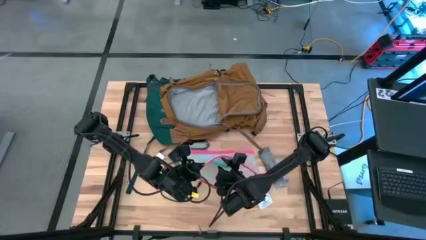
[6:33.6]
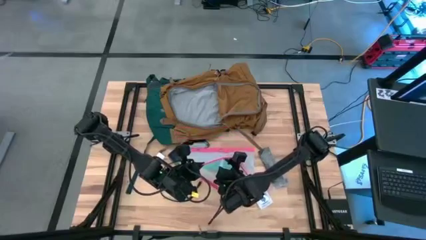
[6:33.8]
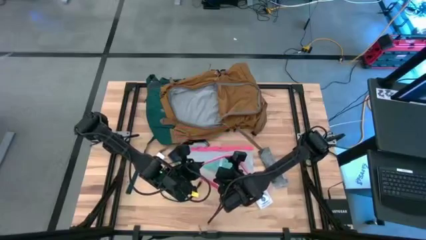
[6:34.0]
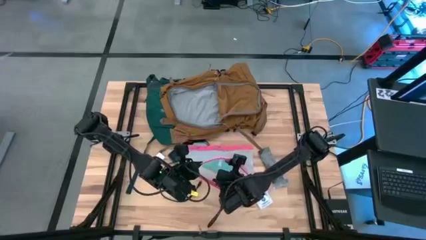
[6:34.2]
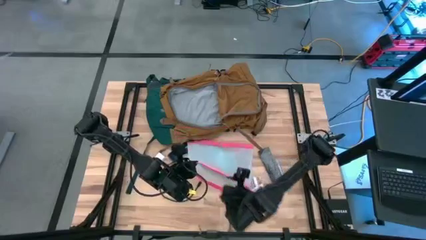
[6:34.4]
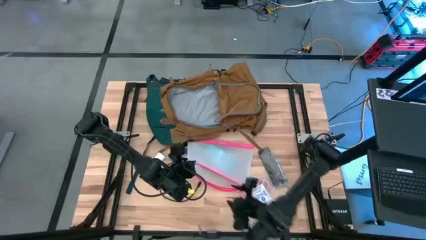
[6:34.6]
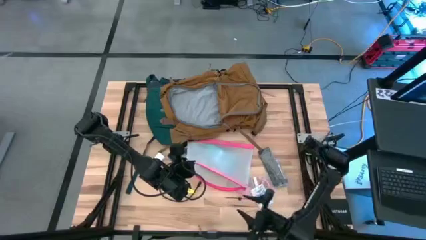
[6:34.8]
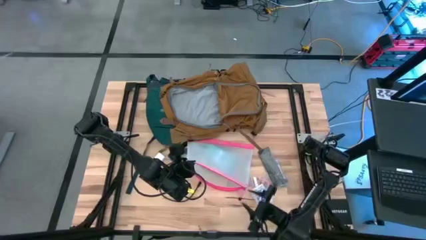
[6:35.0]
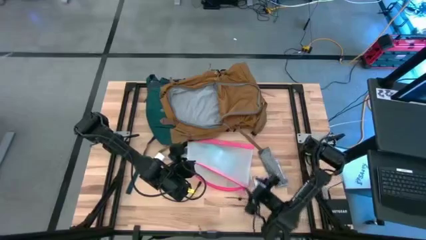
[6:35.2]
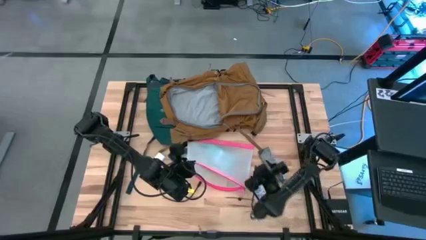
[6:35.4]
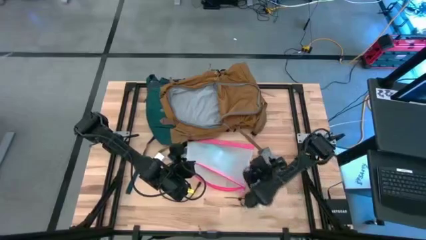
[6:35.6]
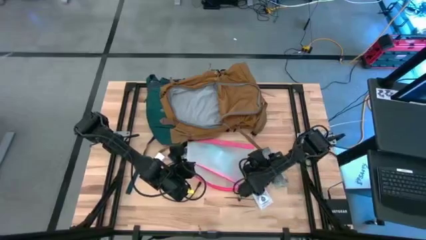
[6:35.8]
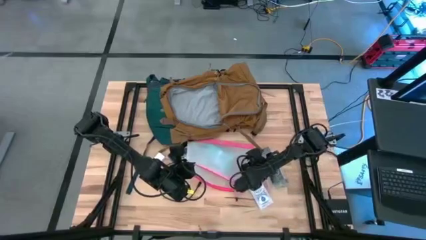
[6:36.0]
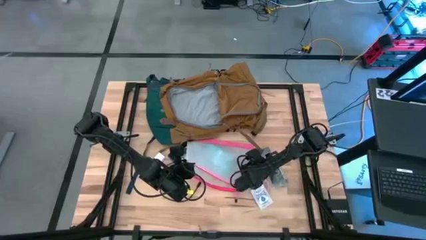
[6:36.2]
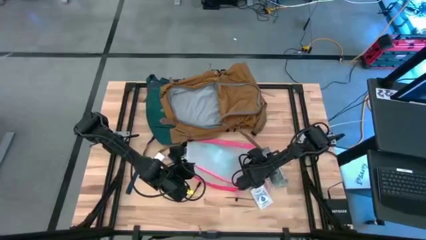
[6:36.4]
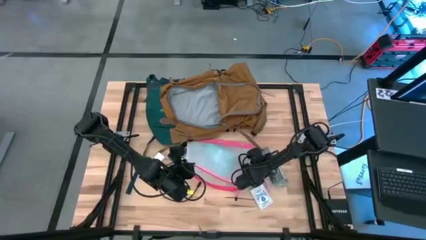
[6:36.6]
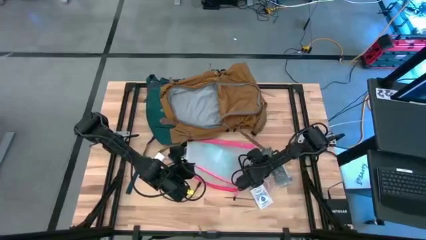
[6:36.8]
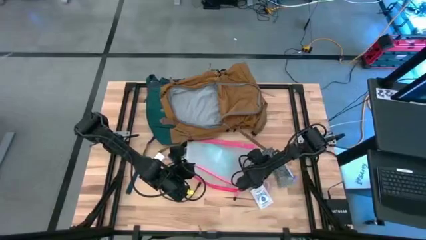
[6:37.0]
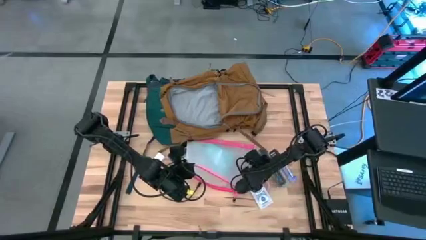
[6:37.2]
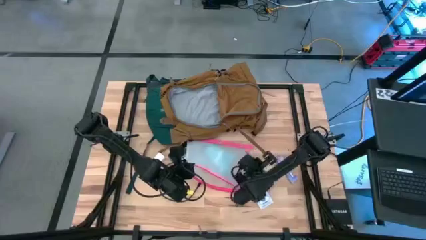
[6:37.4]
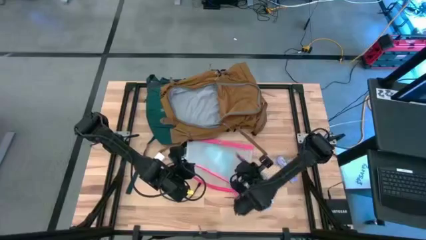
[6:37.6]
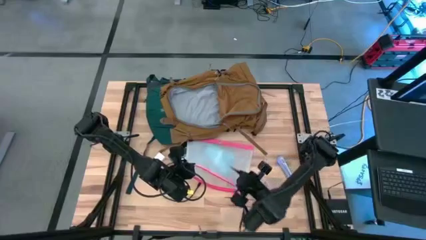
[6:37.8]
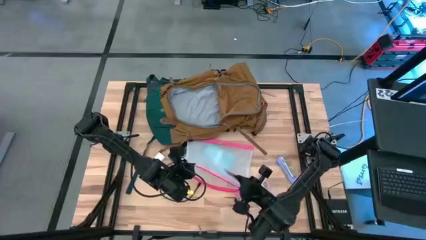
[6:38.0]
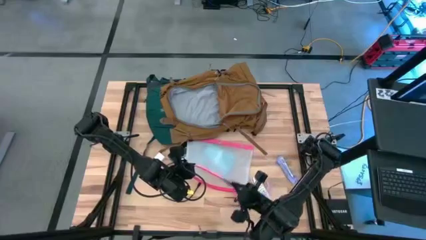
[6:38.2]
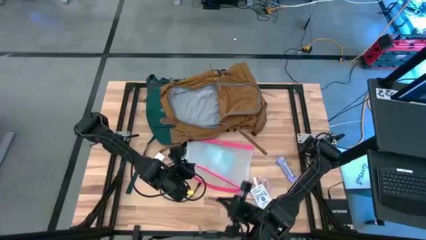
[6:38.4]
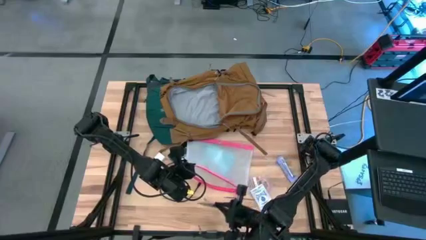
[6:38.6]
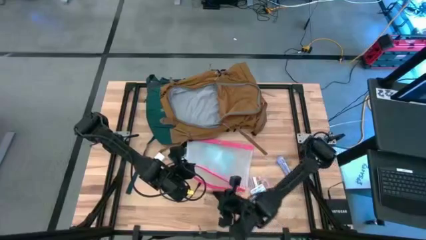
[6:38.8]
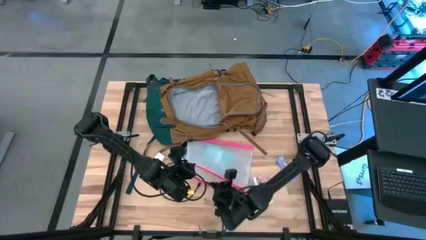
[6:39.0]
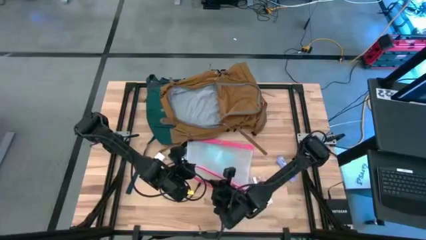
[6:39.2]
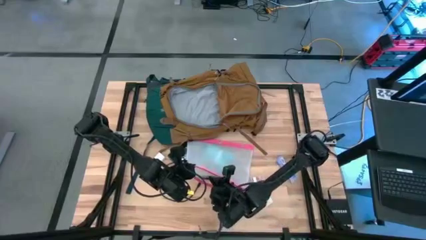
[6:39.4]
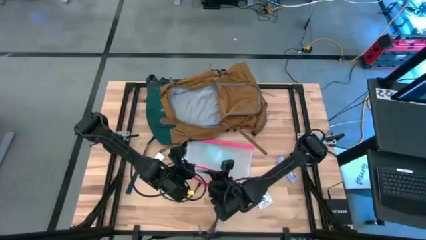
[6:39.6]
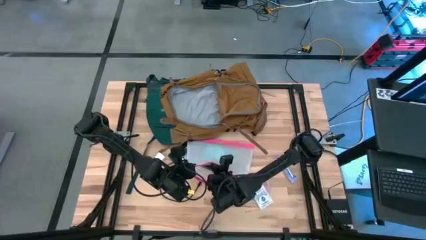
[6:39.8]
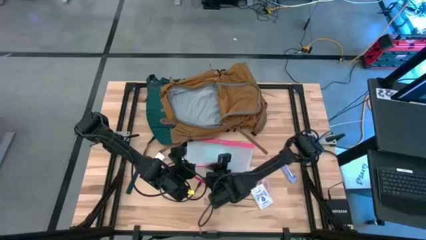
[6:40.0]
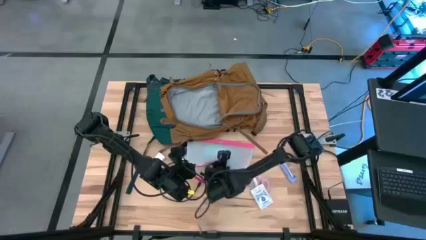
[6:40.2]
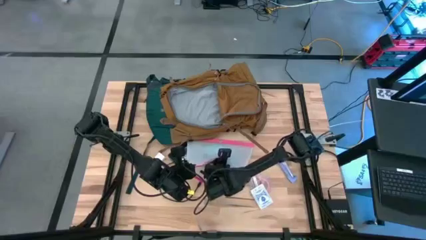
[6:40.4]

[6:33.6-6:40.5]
Task: Unpack backpack
Put the black pouch into the pink zipper pouch

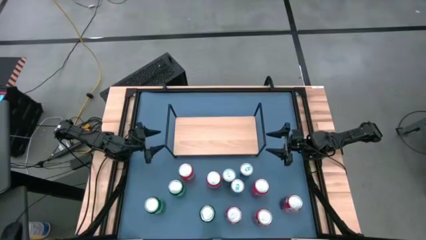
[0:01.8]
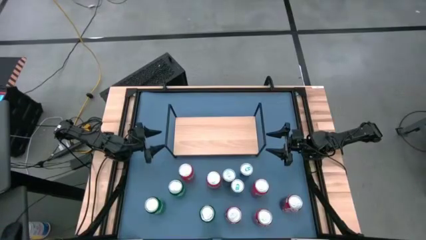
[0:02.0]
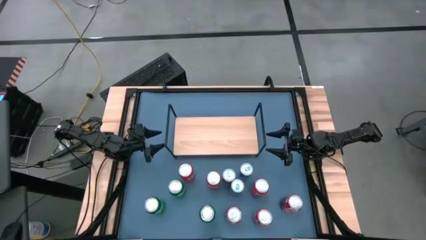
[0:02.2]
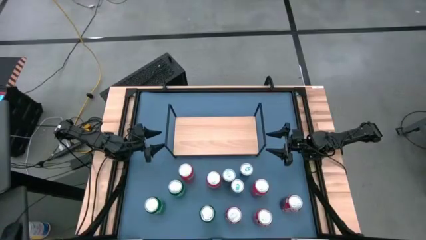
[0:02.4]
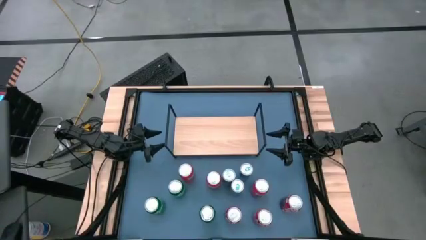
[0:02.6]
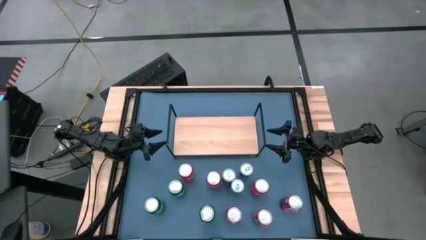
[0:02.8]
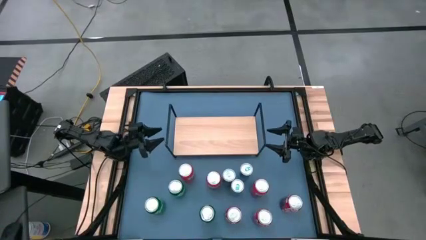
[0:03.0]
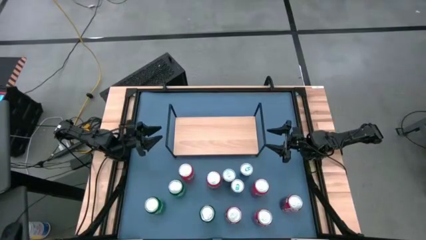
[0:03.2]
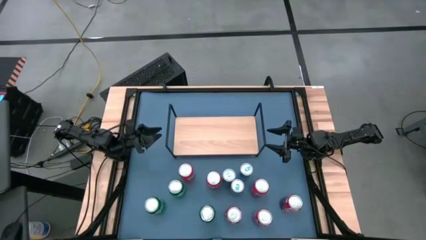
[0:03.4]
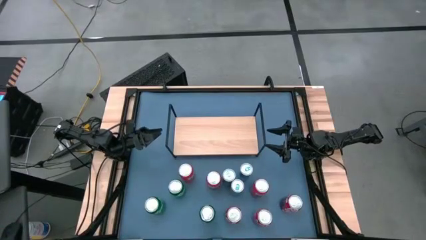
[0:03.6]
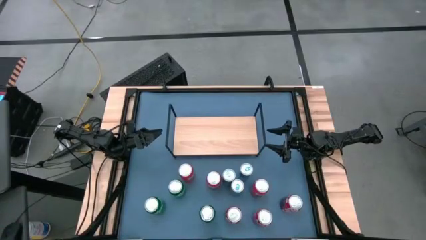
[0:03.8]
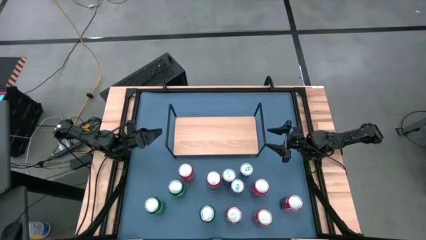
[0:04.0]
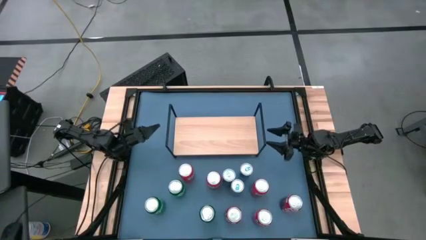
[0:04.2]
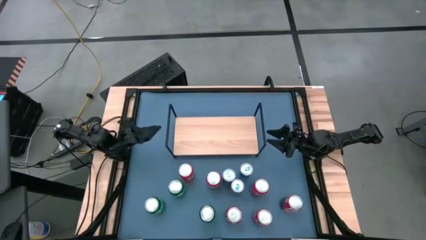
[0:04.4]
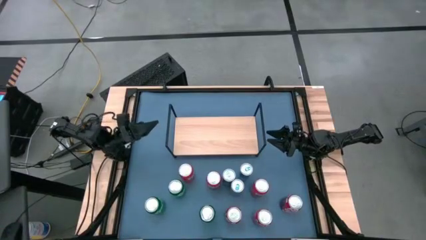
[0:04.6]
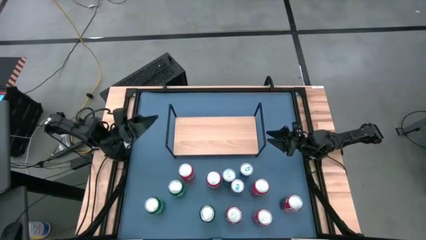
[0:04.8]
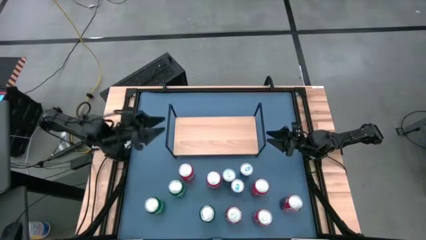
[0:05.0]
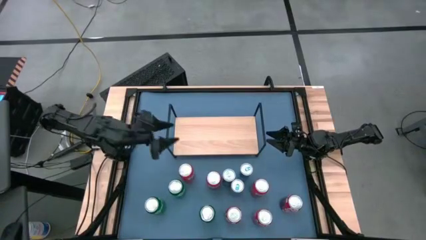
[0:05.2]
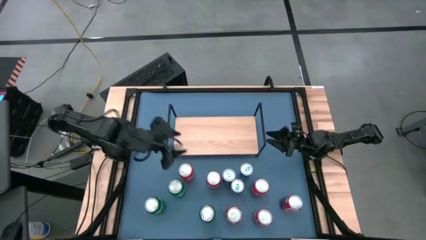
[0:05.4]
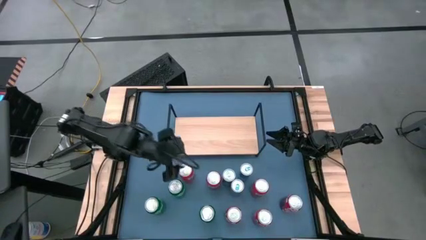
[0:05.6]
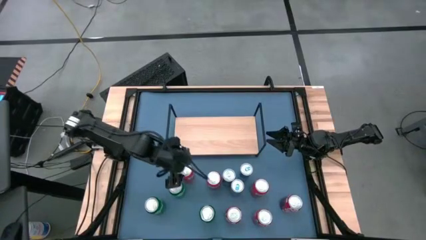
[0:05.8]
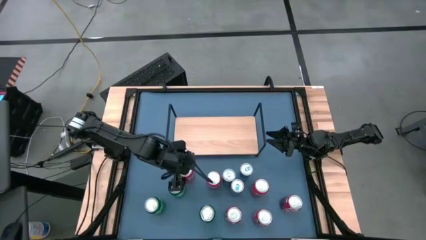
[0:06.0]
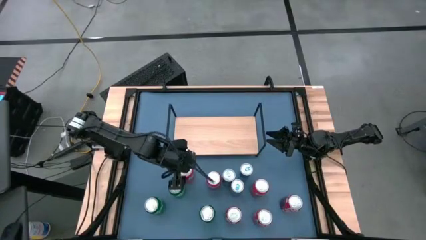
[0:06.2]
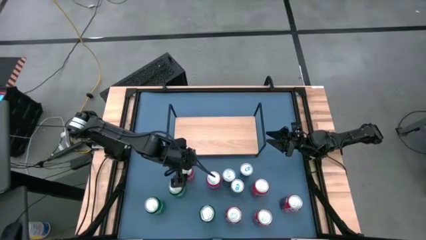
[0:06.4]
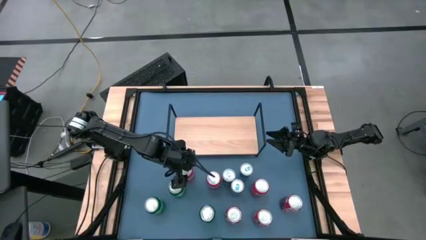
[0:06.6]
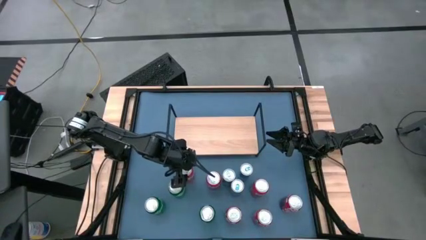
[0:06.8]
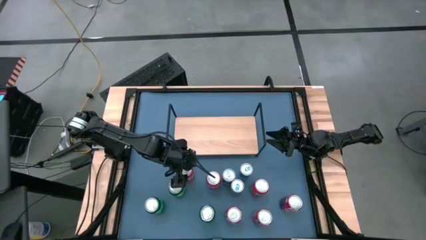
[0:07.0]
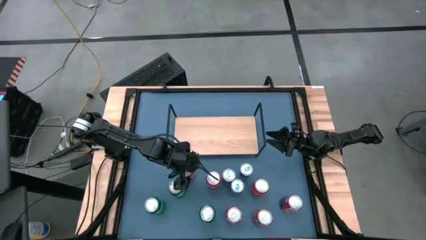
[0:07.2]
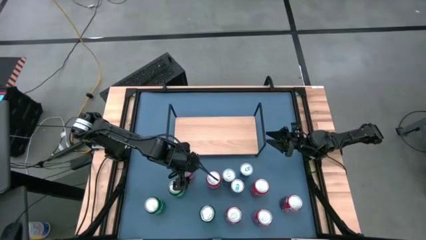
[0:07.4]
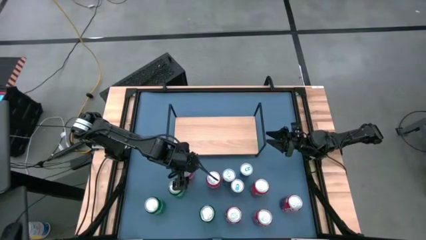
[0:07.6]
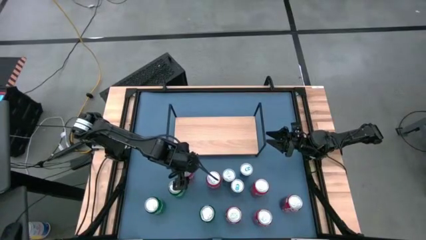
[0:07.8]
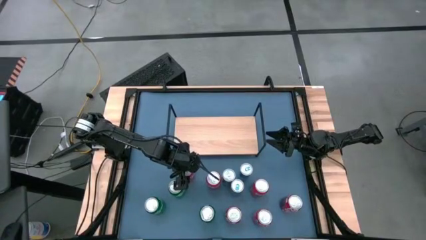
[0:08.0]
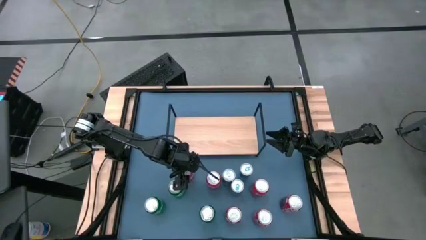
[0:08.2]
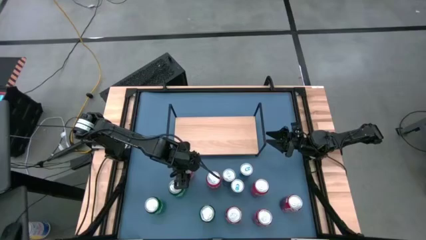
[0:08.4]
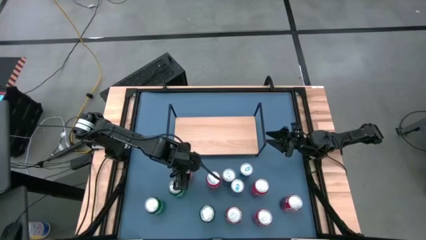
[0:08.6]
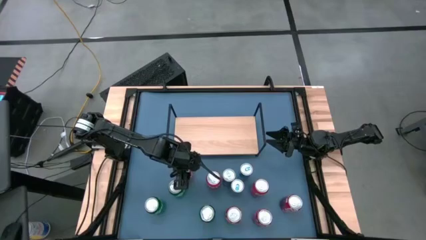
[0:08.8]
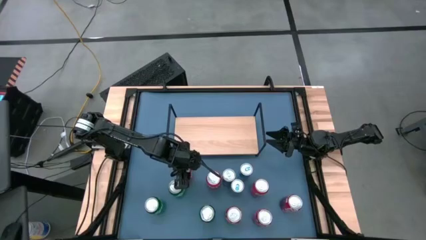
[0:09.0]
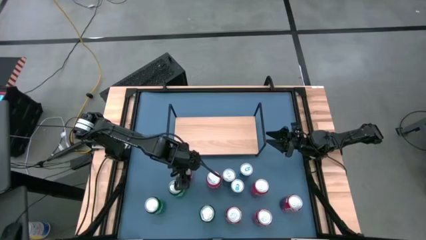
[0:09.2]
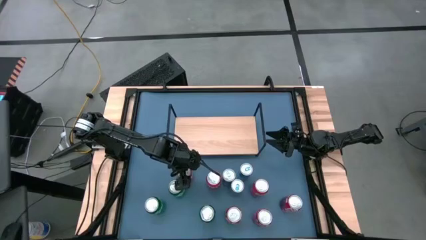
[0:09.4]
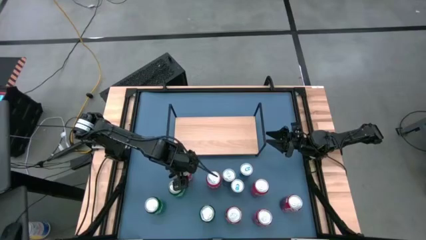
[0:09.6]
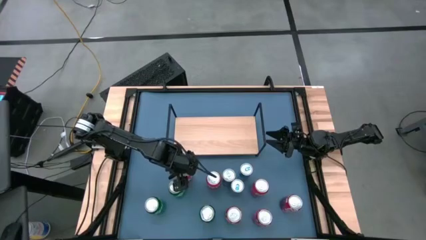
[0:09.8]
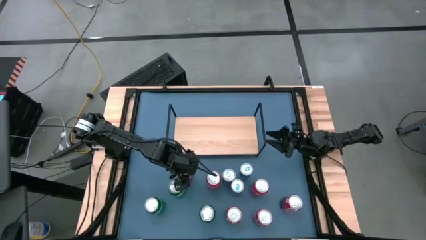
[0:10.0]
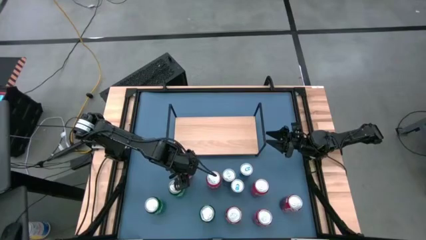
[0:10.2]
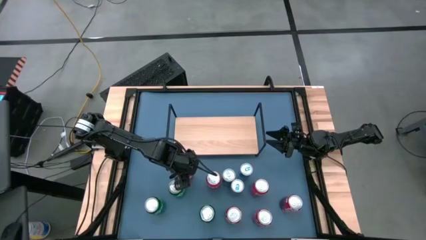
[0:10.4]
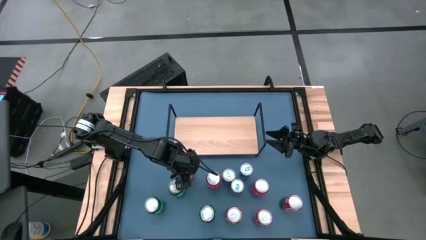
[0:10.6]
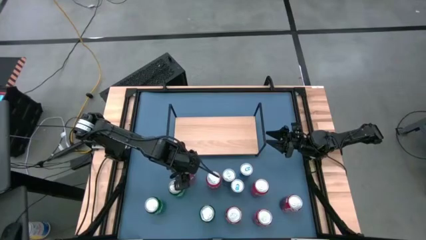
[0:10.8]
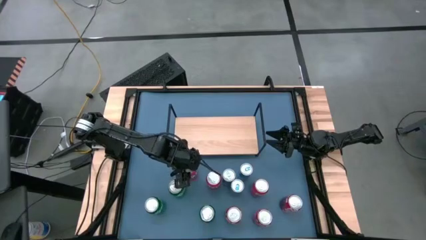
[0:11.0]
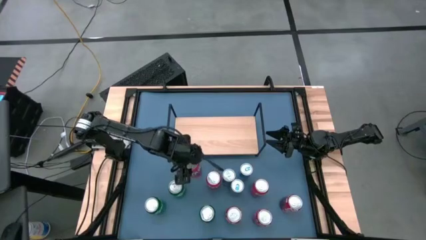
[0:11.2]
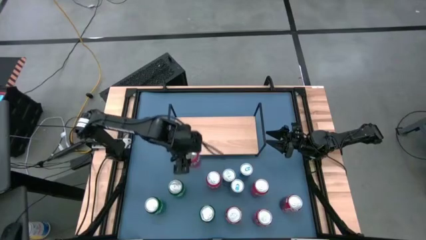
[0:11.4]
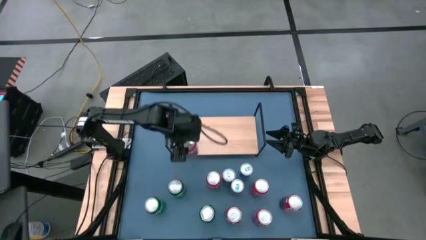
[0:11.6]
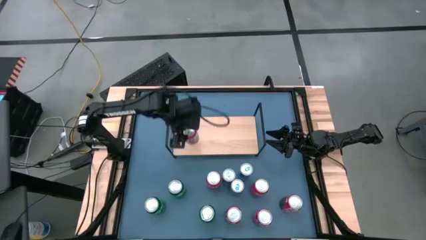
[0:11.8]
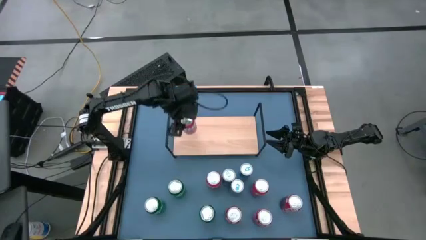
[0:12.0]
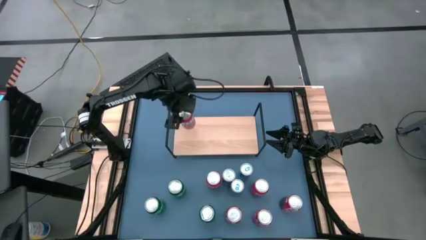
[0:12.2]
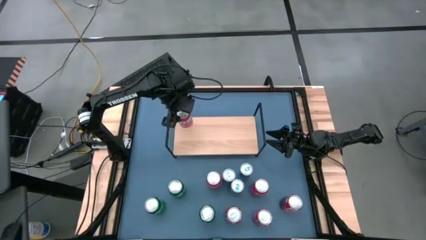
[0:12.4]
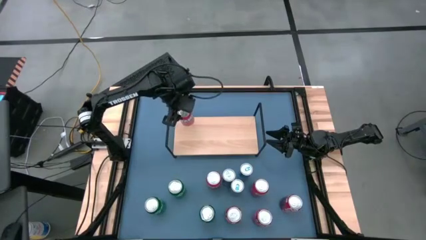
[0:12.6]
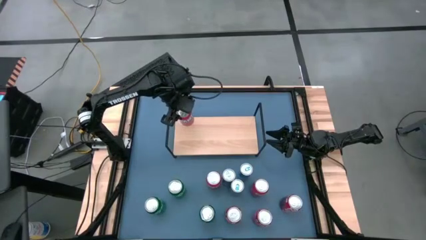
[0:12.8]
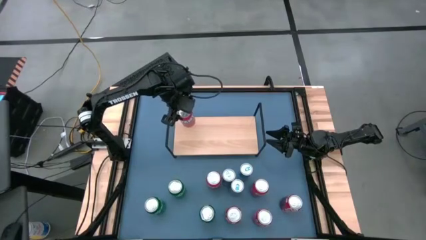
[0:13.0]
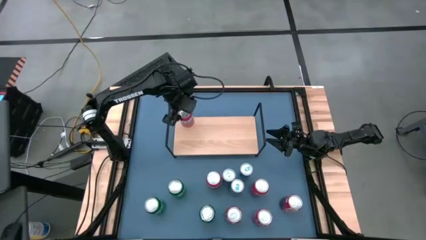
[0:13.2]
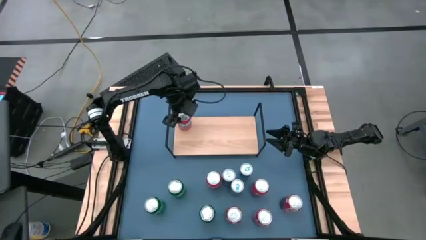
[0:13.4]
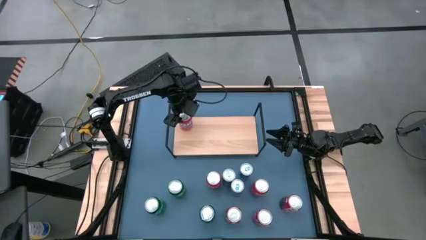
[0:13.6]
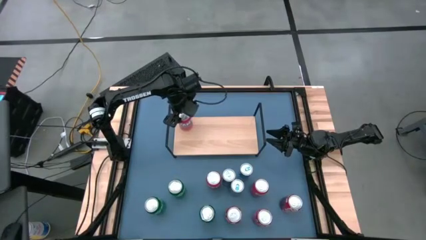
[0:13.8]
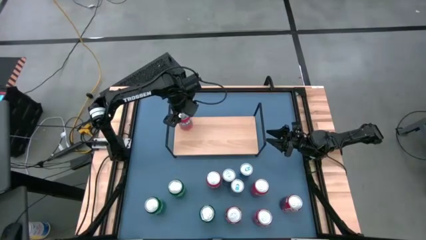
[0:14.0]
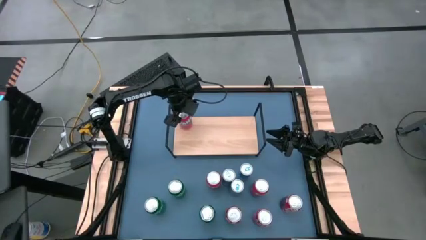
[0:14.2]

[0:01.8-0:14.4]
Task: Place canned beverage on shelf
Put the orange soda can on the shelf
